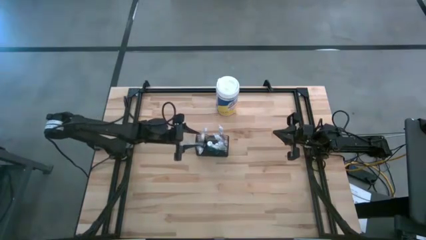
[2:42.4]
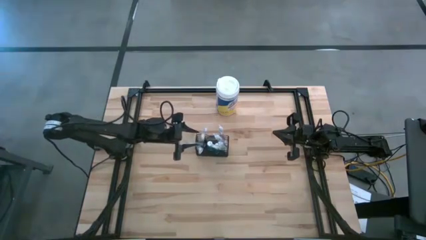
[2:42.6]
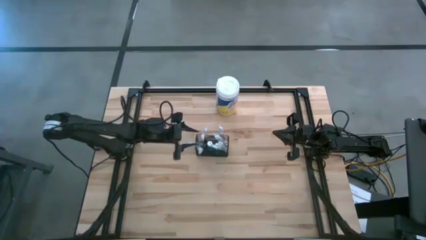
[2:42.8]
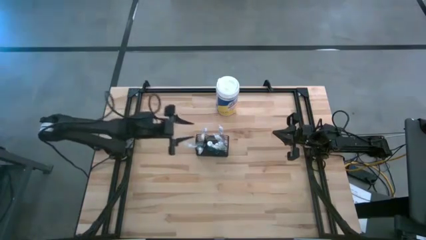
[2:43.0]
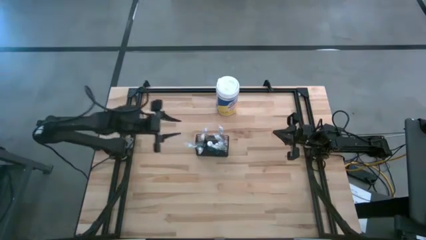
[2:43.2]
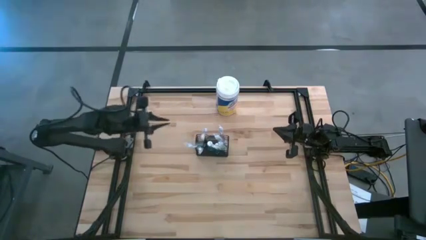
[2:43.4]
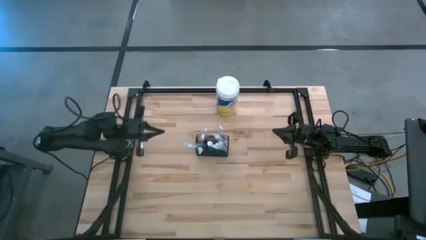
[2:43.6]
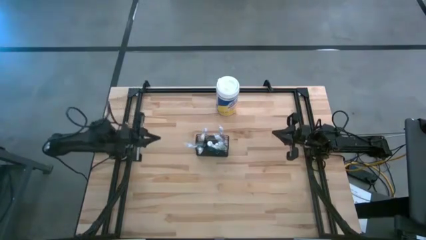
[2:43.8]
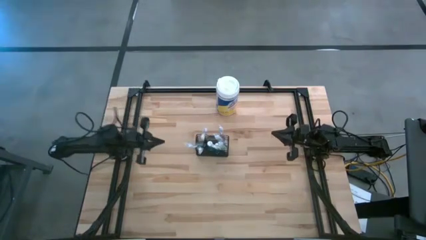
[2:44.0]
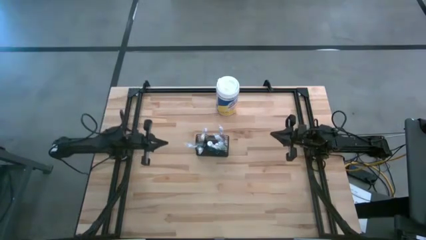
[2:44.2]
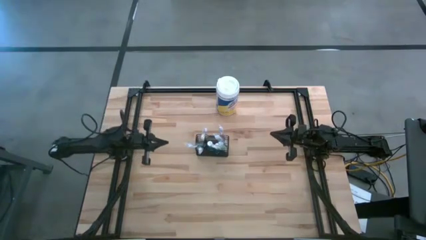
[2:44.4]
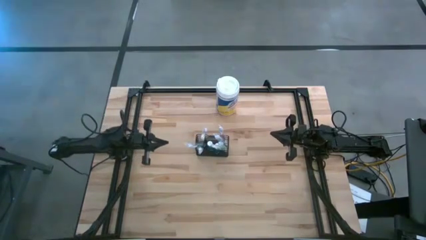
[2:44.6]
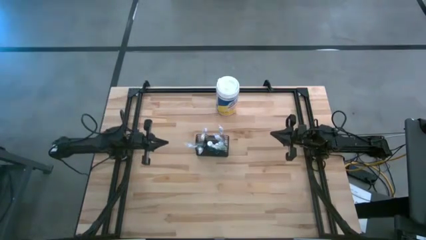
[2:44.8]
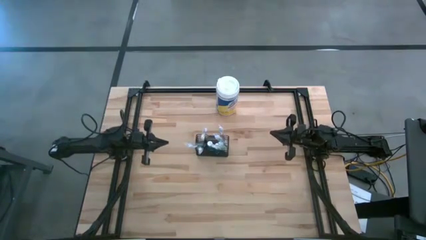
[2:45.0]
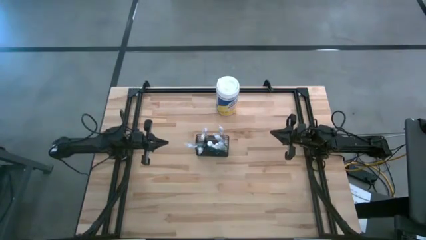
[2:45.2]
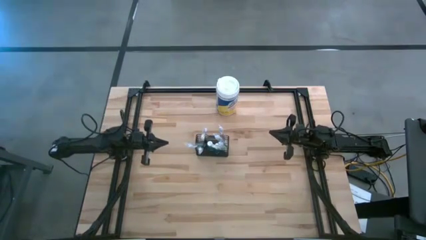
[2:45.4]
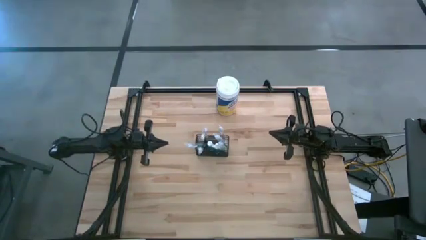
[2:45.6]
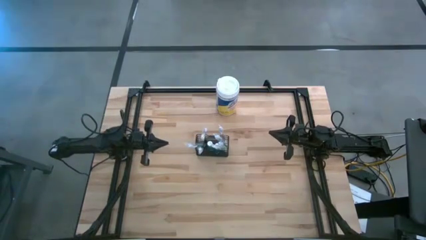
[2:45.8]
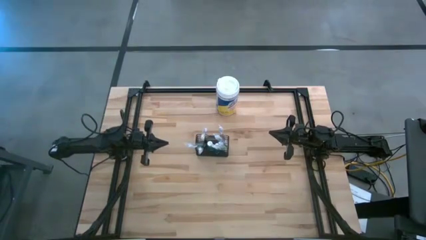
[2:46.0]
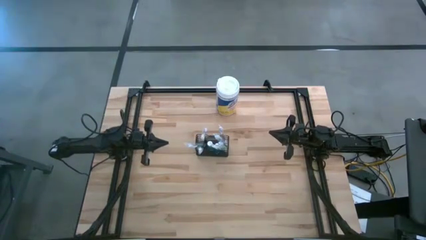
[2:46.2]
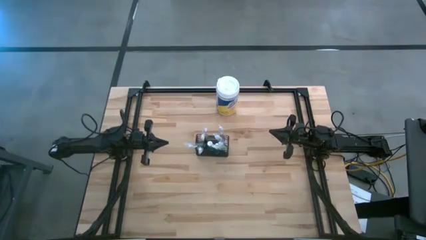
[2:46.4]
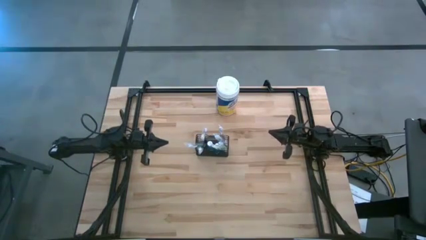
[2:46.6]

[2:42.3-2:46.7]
Task: Pick & Place toothbrushing station
Return to Home Position

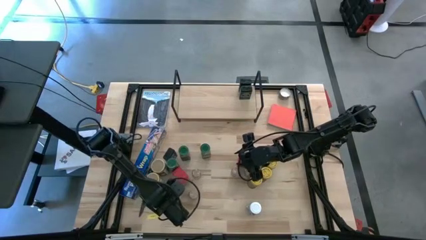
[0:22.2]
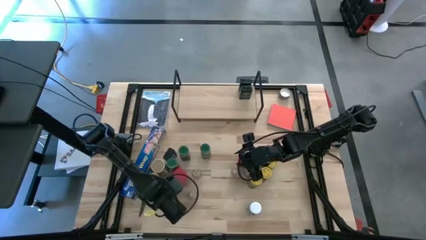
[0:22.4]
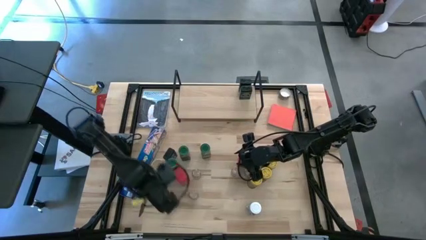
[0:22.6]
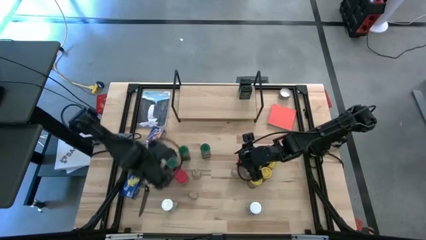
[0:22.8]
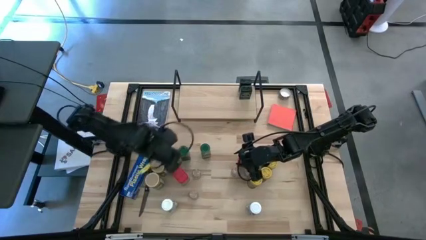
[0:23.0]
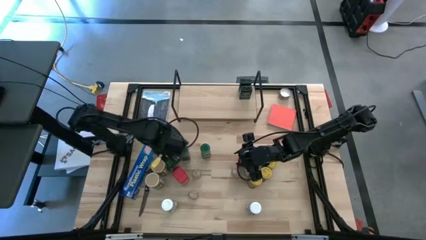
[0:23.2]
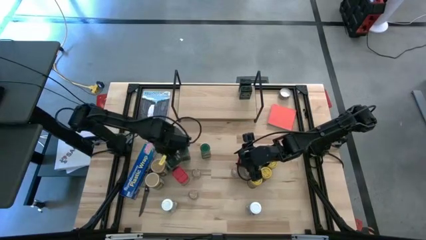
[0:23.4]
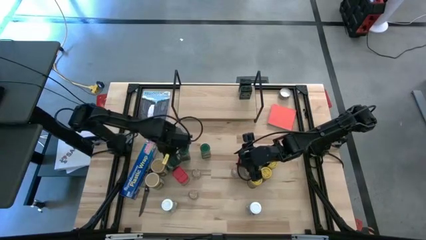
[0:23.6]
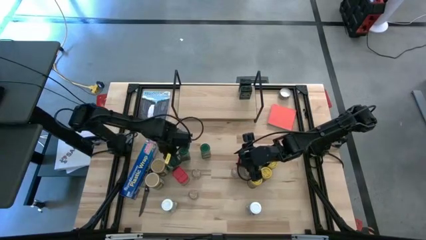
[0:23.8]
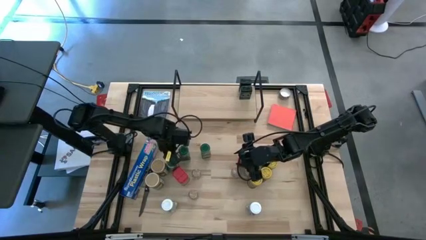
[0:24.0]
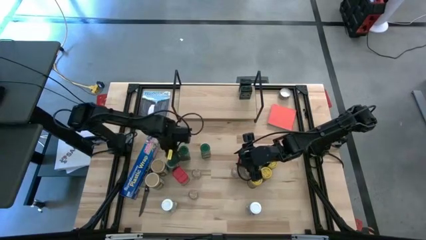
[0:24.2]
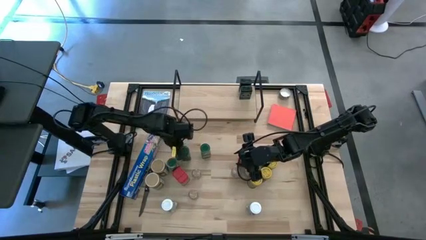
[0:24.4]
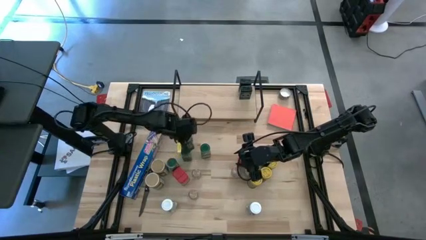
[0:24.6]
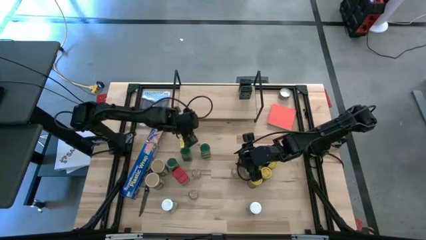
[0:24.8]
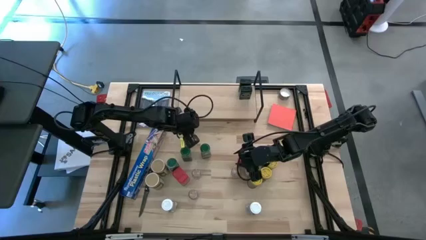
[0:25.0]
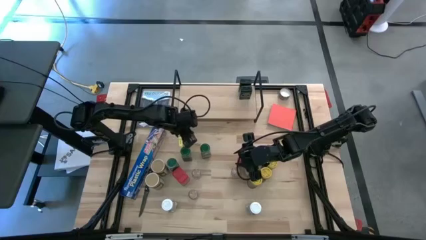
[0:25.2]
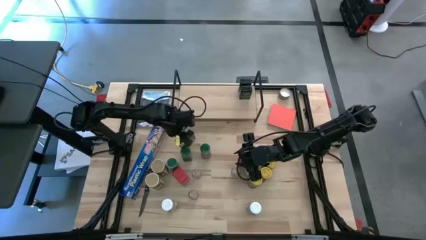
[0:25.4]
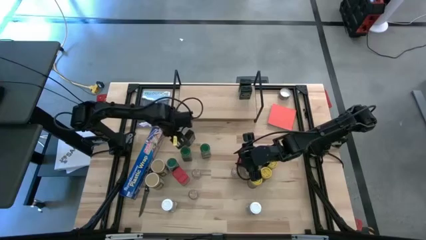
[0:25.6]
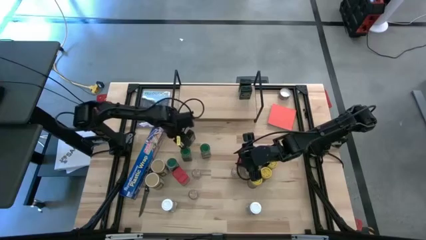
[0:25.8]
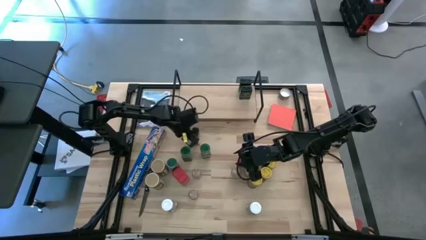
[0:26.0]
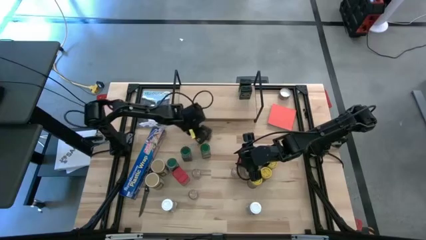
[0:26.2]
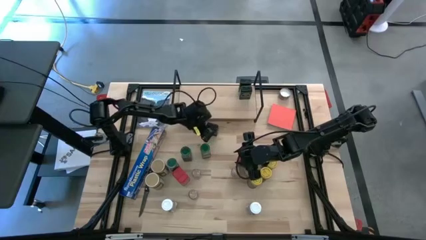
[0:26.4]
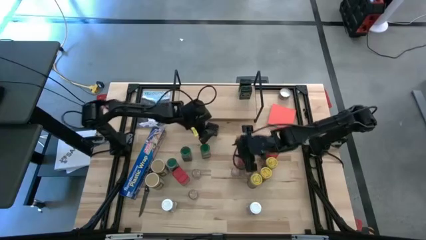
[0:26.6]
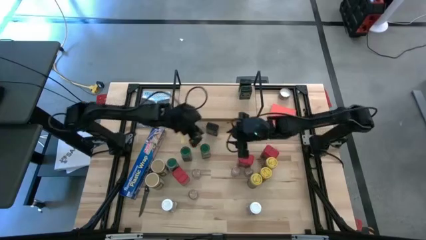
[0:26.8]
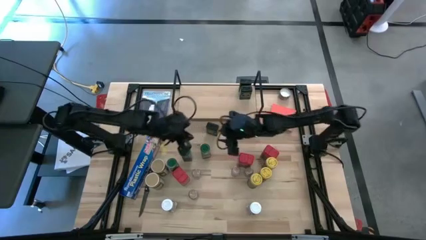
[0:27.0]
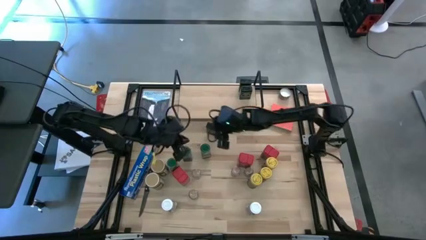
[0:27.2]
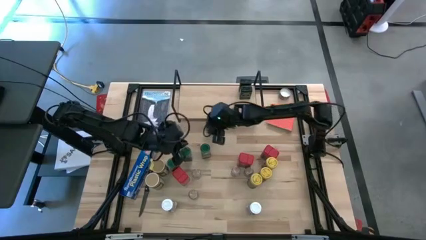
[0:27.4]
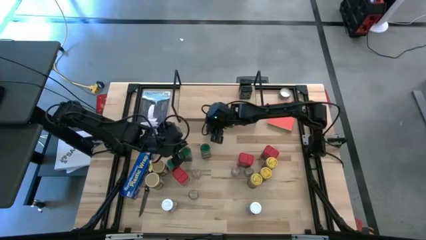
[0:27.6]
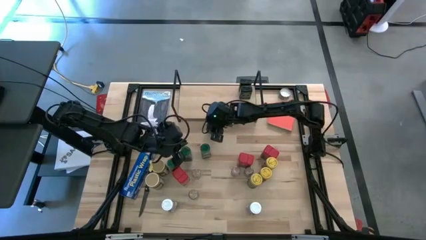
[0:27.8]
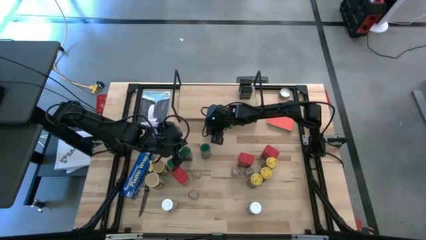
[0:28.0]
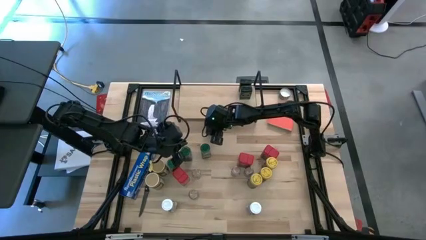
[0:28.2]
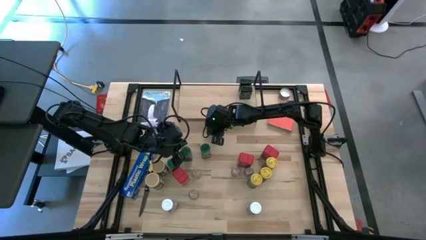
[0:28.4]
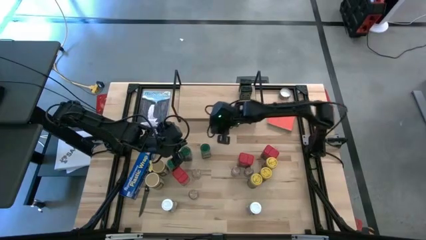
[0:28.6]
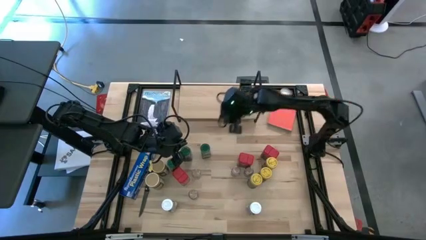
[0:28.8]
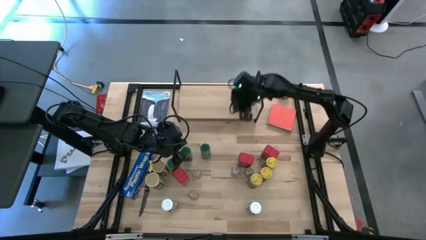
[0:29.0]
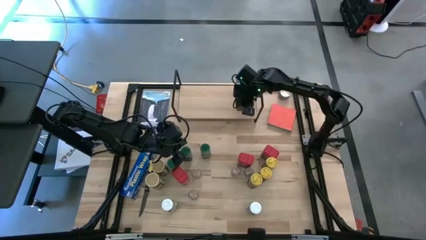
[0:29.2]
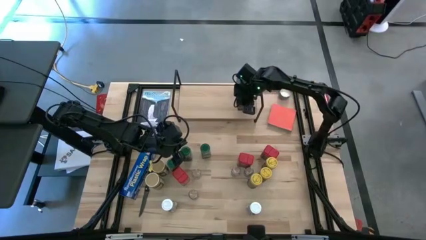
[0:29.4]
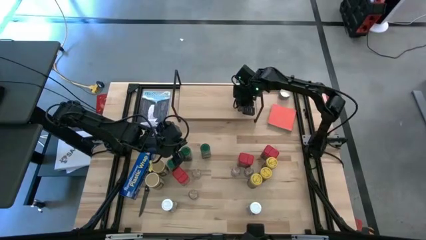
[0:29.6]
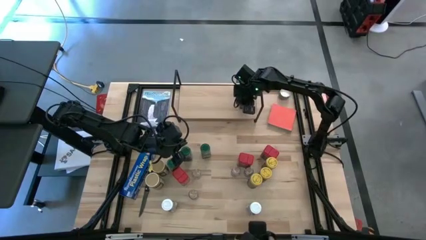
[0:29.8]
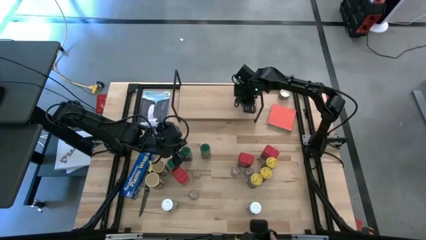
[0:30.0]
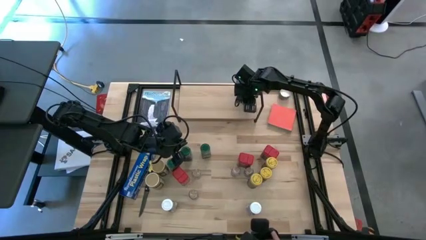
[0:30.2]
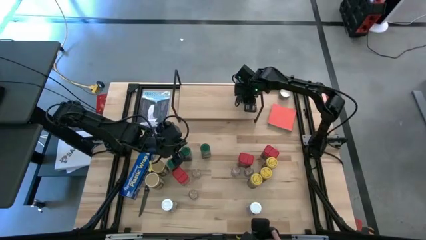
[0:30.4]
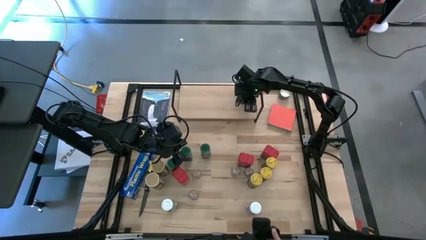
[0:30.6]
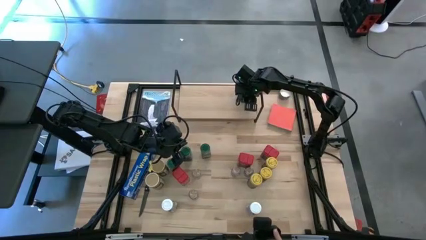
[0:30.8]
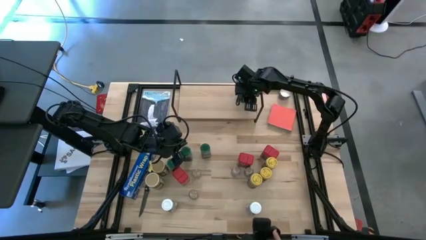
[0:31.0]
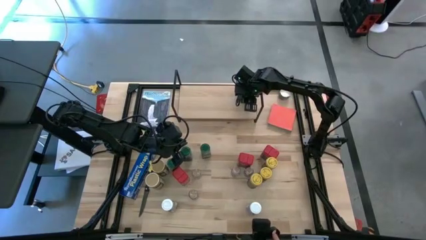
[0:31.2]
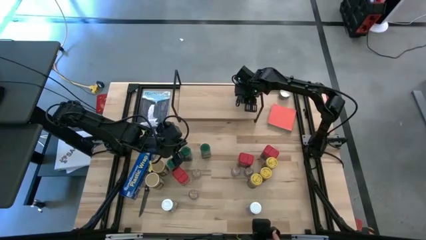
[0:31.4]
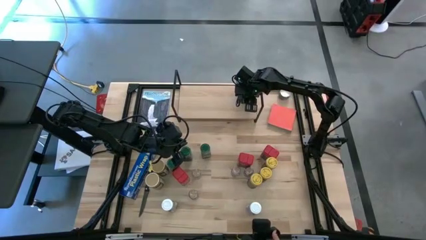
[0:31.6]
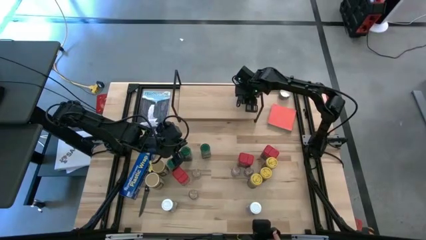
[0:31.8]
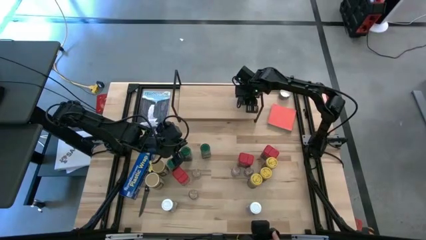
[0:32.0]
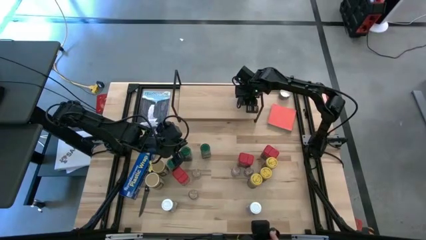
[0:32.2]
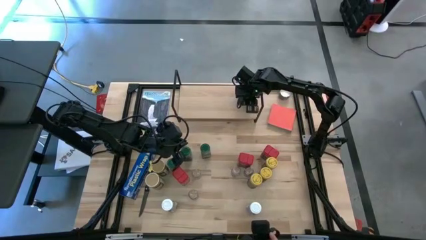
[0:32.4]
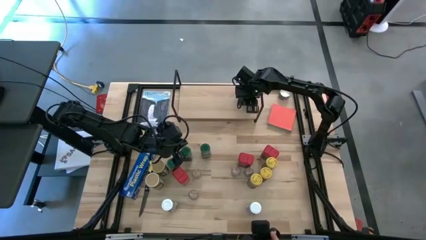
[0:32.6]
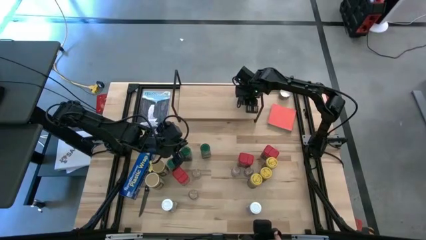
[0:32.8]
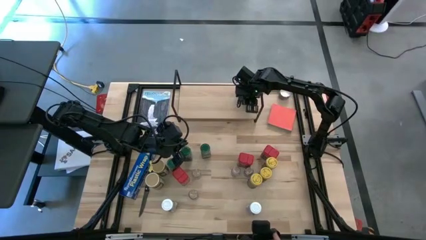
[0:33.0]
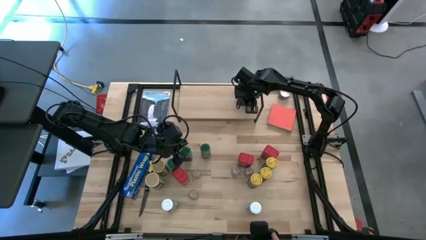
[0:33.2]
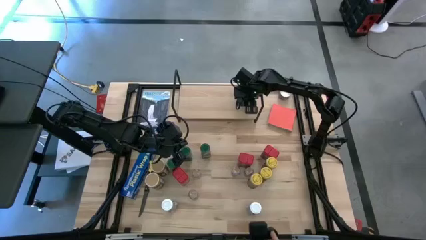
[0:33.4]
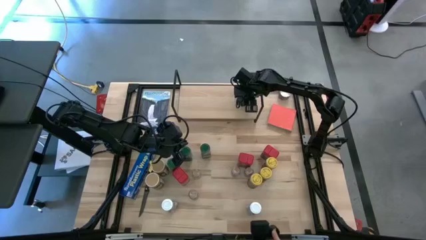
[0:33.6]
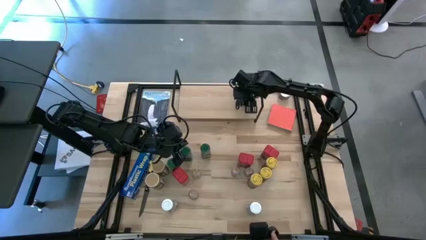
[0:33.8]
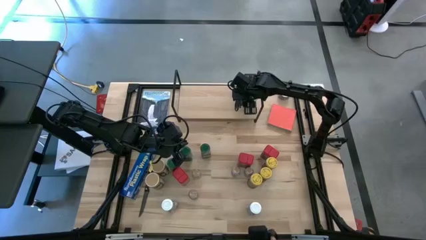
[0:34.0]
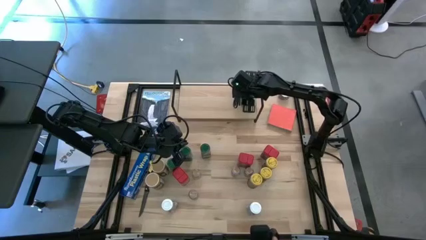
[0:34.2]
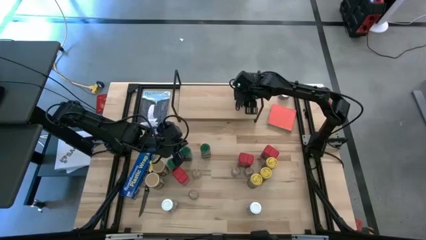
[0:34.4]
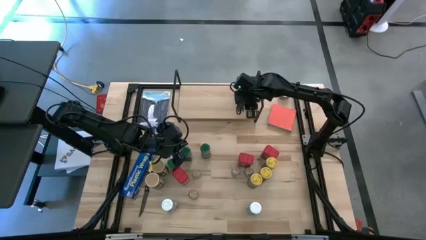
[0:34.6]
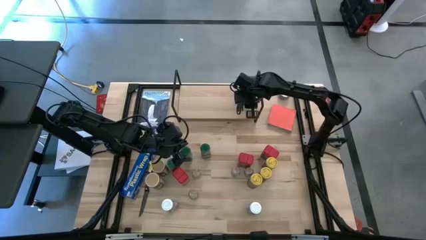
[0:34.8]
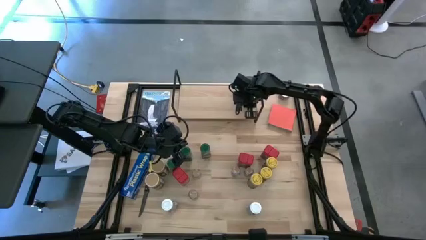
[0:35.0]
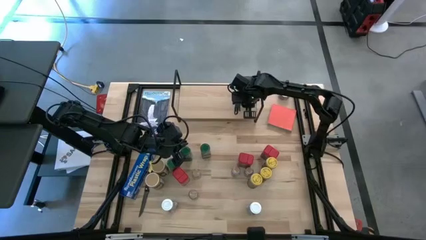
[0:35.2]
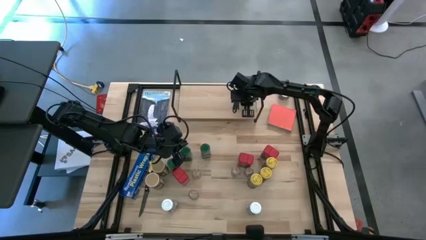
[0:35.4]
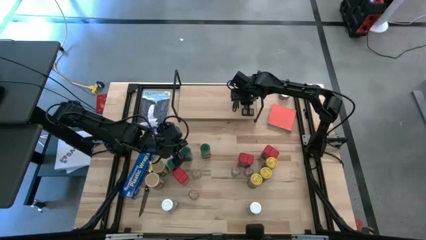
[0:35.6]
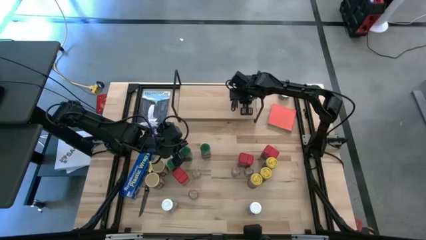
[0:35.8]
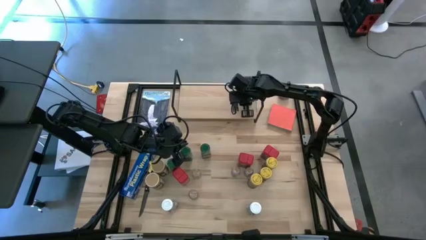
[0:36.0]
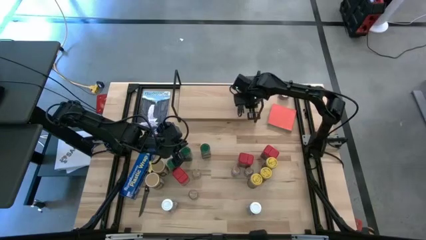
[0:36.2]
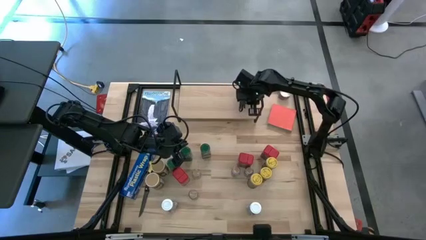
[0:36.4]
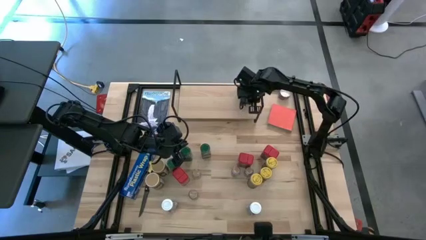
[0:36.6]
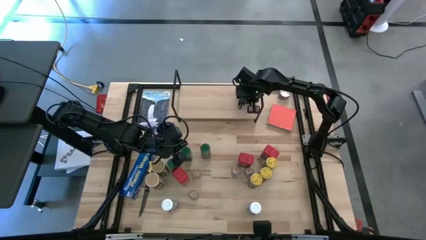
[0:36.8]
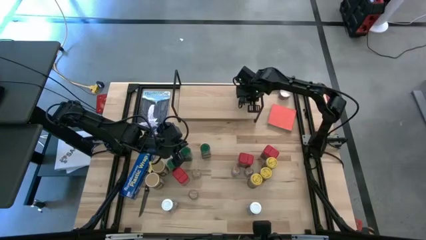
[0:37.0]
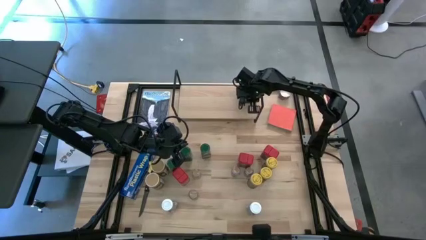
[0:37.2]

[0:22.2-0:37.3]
Task: Shelf spices
Put the black seasoning can on the shelf aligned with the black seasoning can
